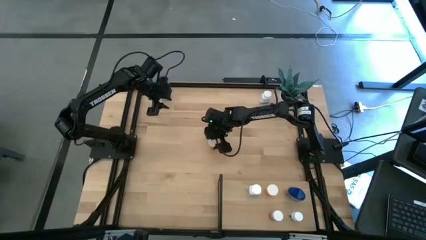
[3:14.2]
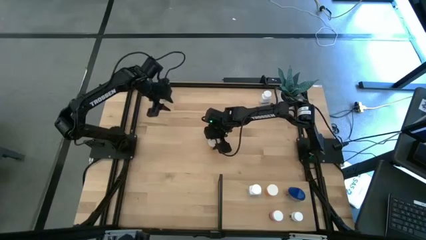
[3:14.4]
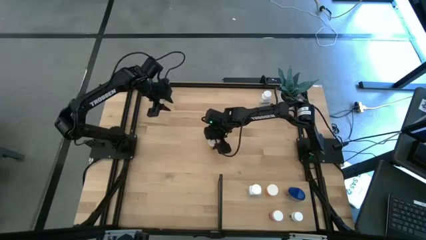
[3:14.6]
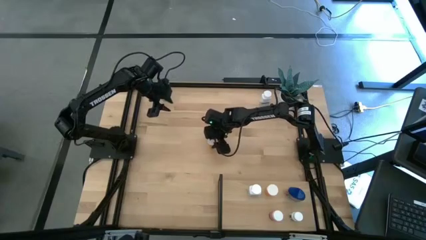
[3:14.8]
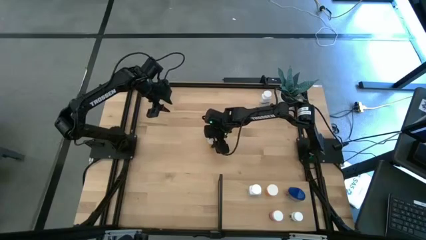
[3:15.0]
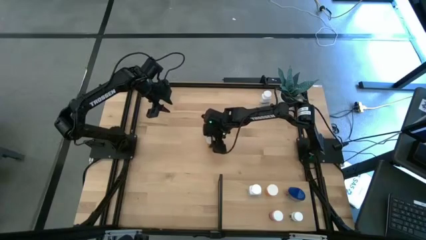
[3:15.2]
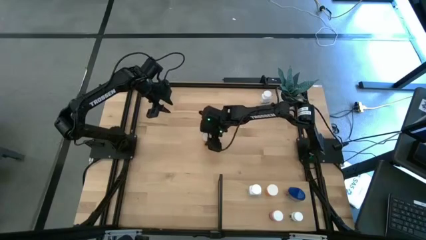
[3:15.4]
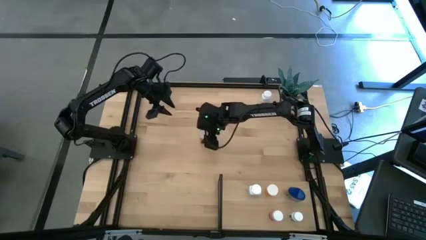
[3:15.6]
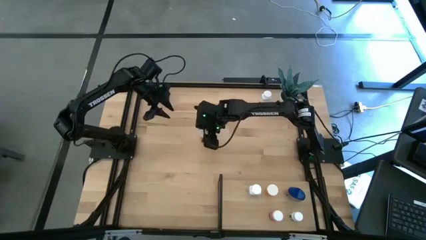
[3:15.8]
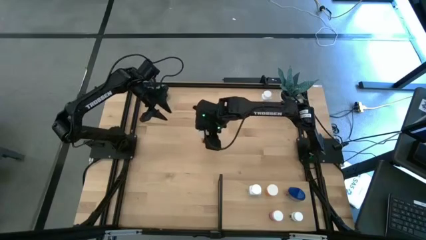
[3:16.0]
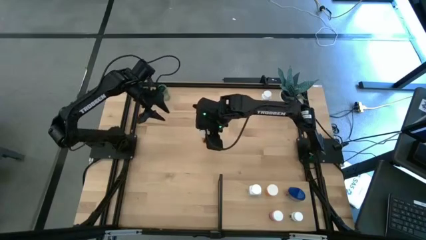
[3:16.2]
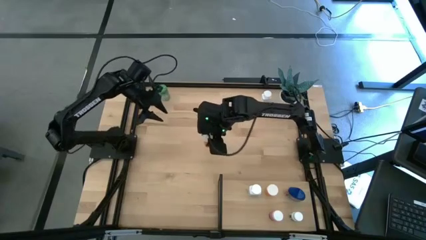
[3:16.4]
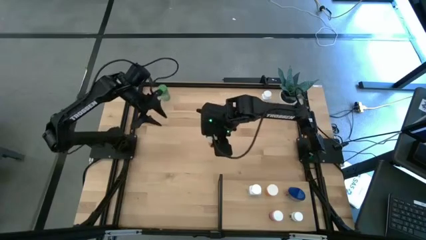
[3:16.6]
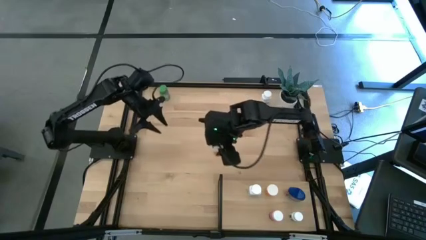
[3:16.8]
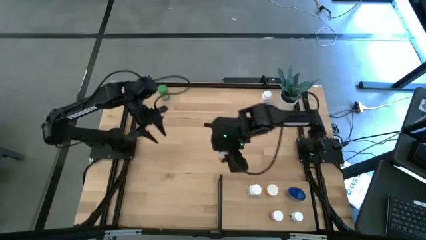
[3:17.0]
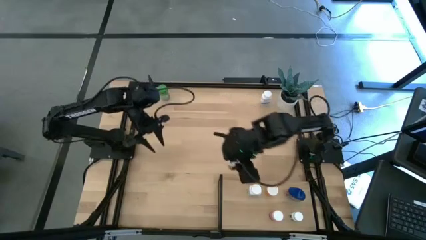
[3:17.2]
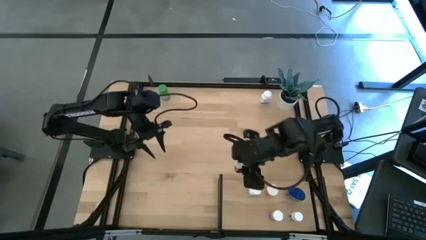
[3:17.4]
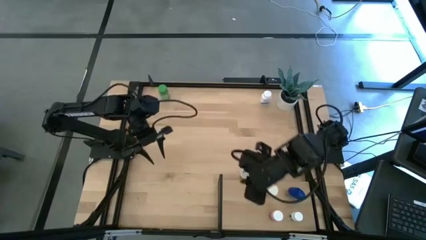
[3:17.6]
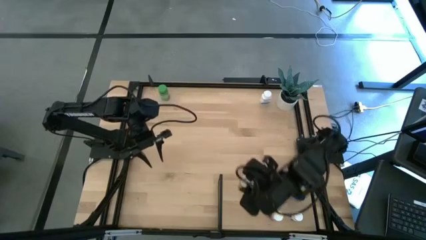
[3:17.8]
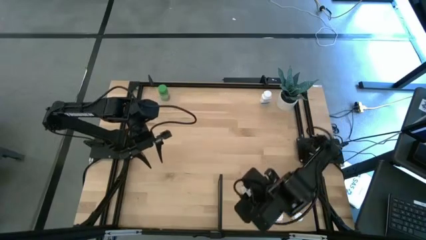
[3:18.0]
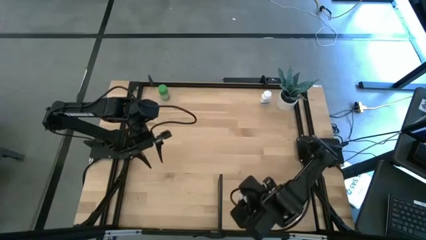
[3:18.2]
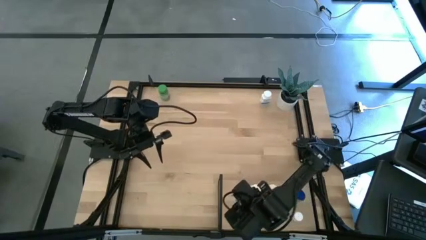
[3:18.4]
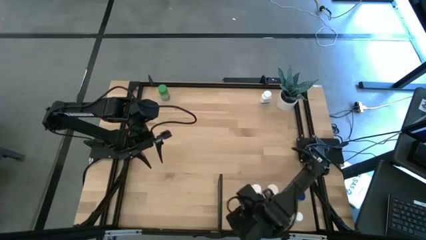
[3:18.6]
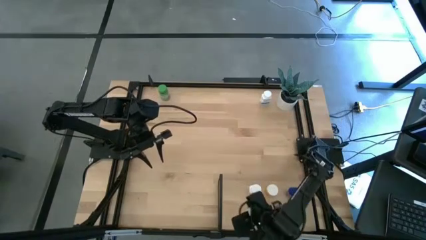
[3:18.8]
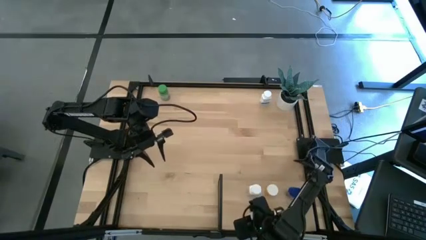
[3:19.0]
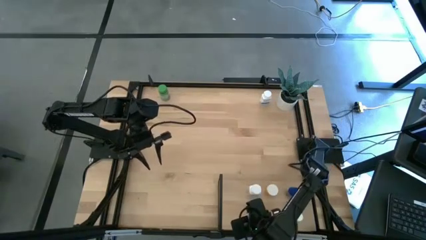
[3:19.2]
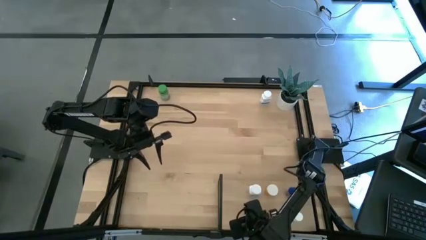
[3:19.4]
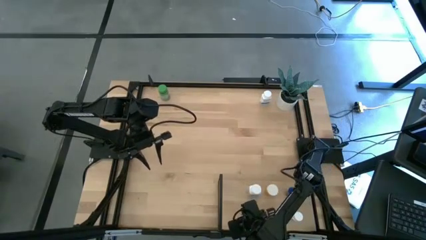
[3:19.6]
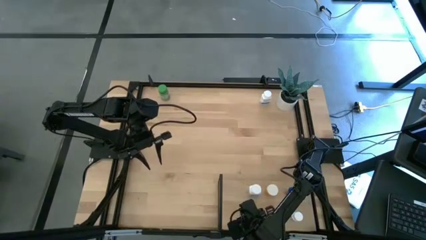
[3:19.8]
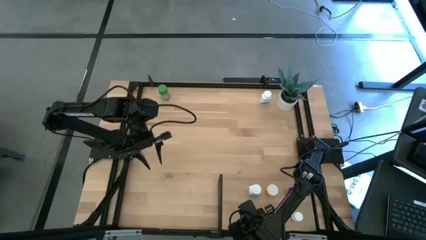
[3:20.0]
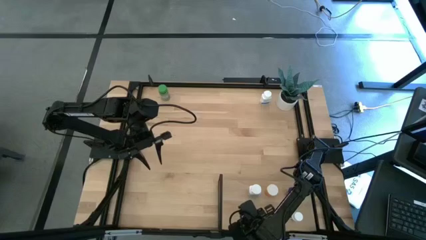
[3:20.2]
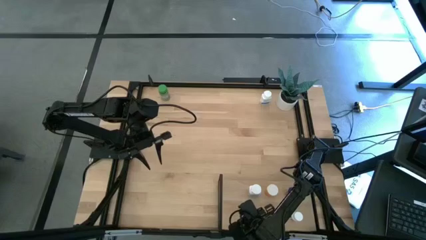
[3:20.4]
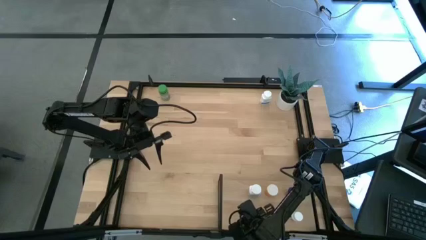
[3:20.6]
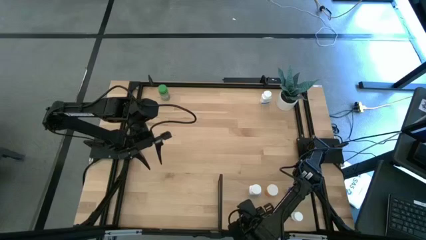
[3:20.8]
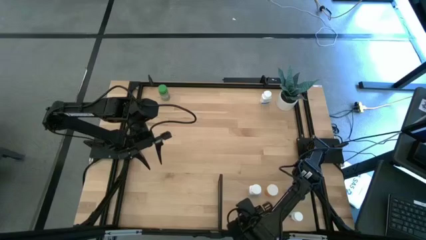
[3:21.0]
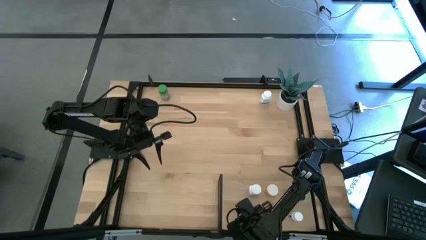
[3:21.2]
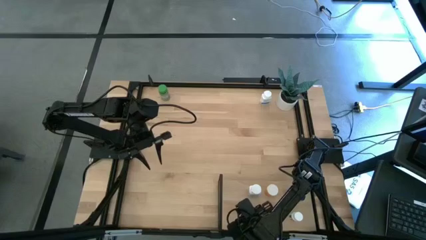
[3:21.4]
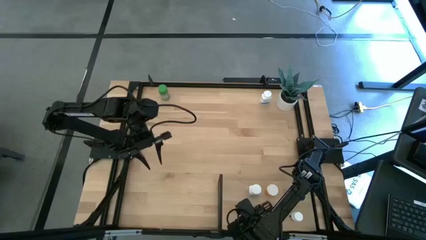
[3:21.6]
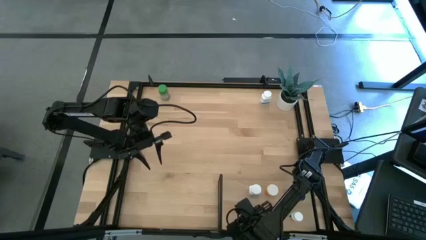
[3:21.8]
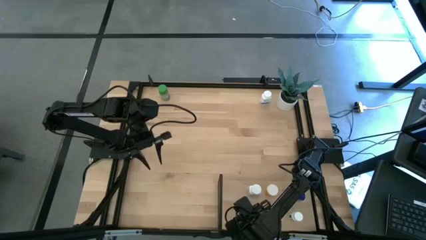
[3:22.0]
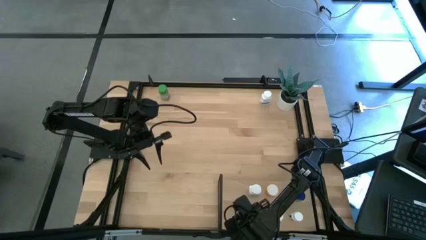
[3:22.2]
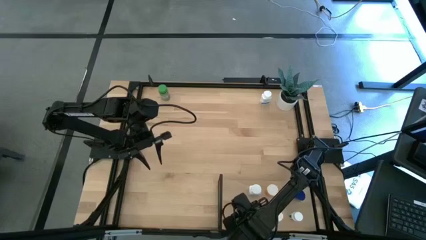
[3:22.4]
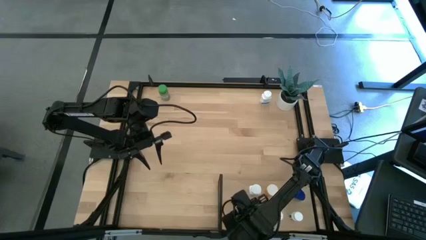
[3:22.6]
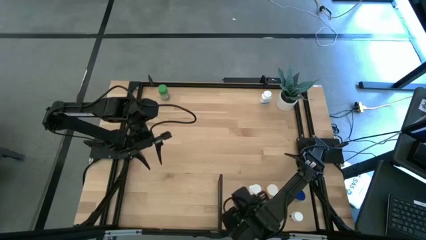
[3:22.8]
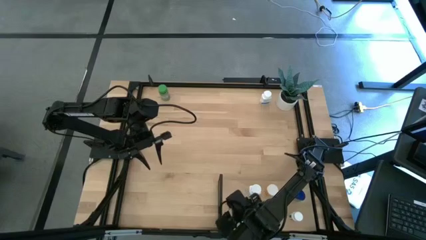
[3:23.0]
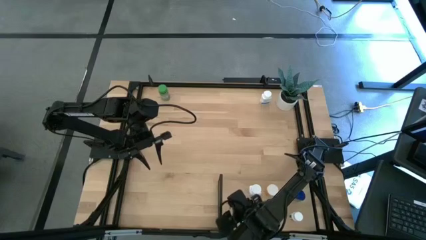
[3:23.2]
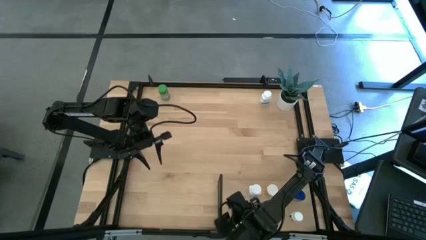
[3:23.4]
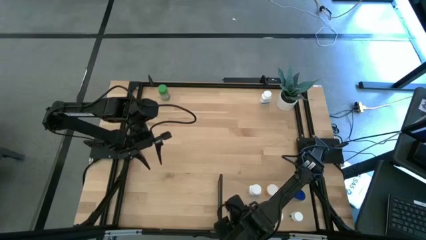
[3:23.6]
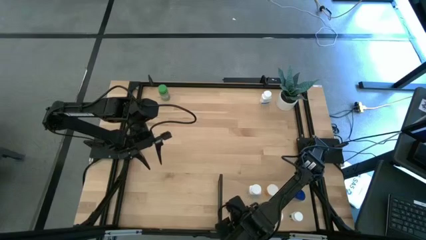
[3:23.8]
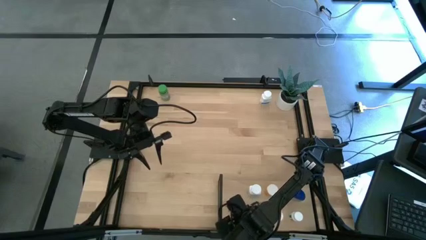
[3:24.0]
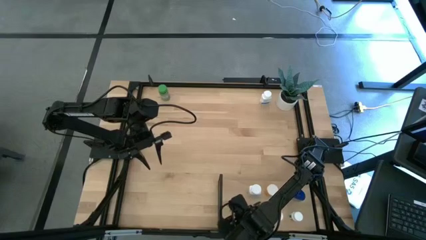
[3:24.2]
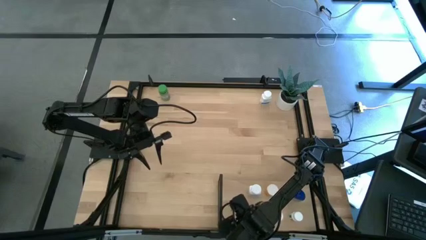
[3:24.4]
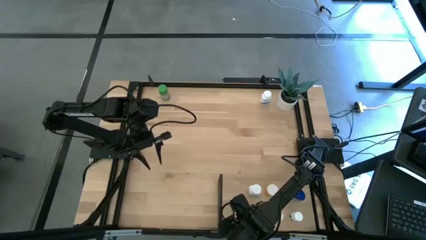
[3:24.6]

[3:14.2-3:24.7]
Task: Pick and place medicine bottles onto shelf by color
Put the orange pill bottle onto the shelf

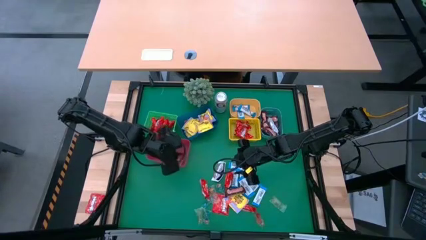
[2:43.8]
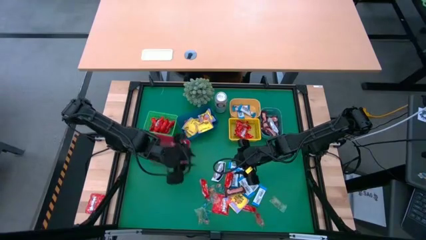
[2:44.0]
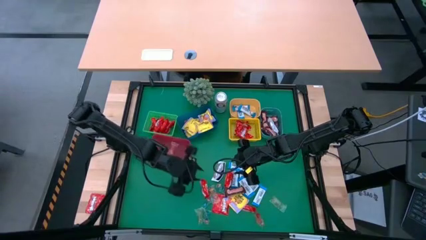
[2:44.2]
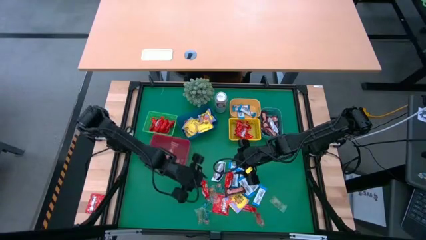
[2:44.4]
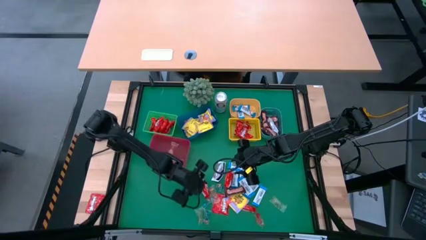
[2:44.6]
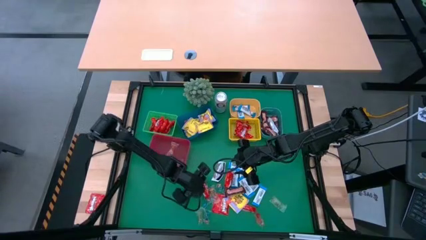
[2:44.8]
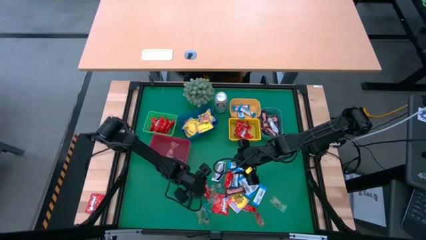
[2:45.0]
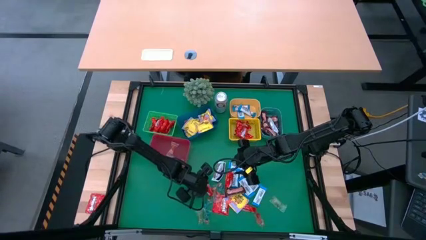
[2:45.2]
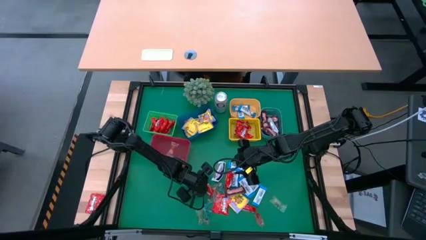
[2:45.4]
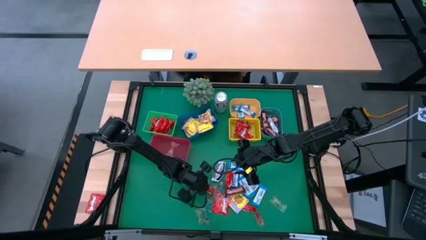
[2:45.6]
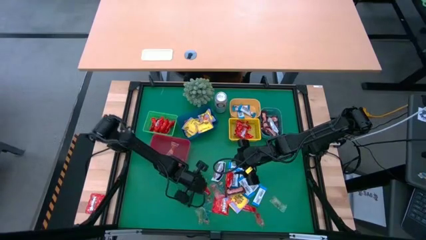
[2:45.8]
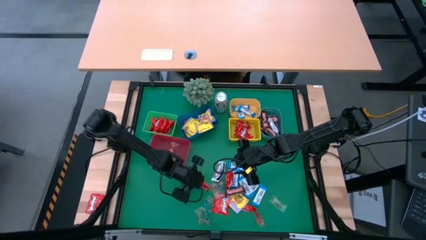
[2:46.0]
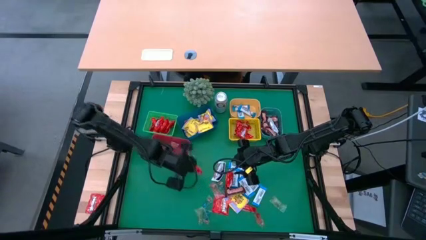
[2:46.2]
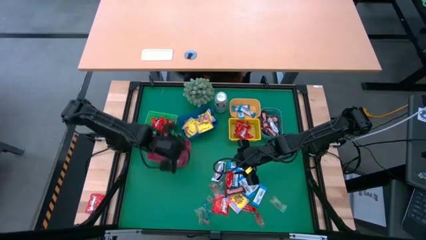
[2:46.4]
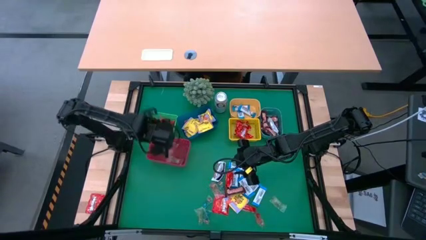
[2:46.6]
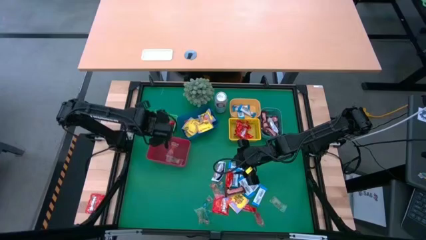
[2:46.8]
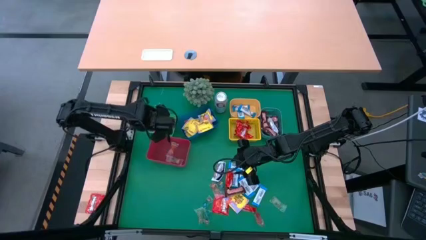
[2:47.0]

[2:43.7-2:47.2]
Task: Sort candy
Put the red chocolate bar into the green bin

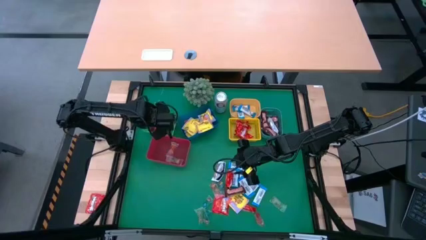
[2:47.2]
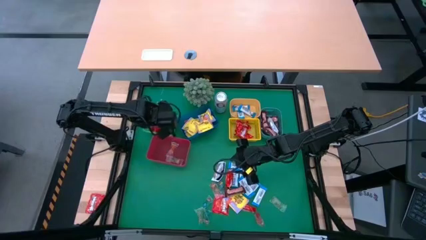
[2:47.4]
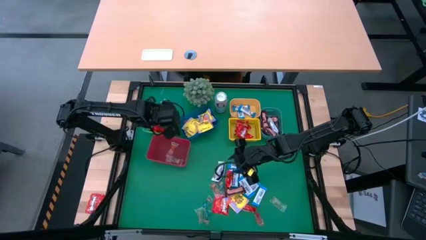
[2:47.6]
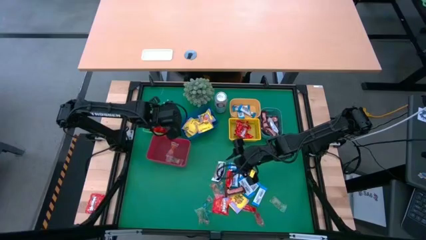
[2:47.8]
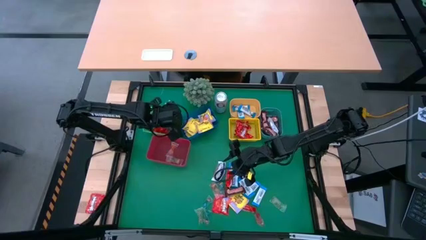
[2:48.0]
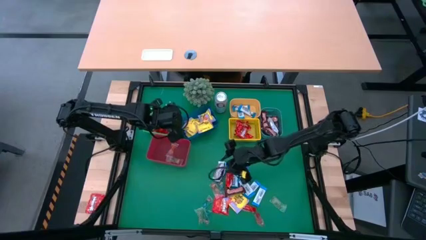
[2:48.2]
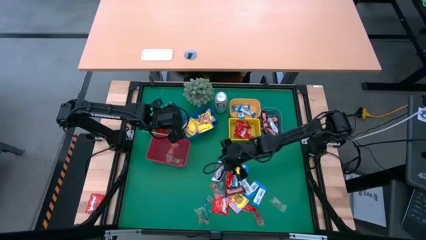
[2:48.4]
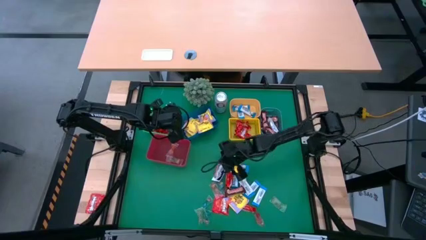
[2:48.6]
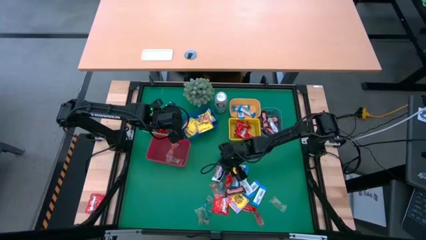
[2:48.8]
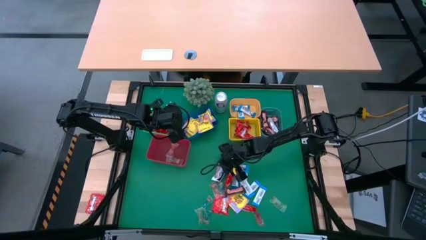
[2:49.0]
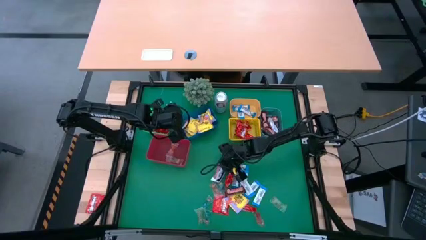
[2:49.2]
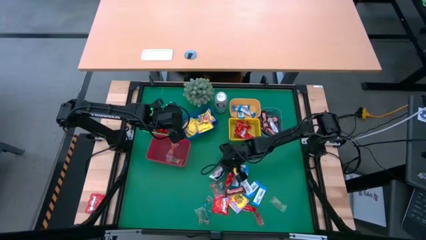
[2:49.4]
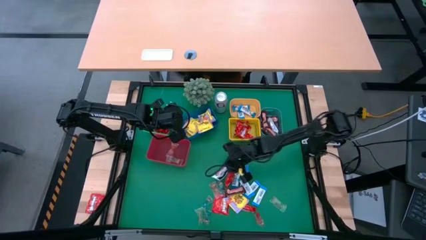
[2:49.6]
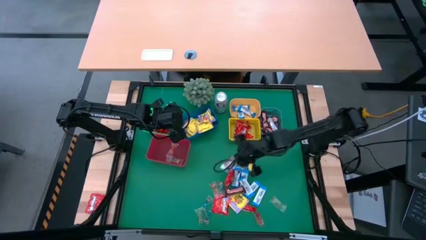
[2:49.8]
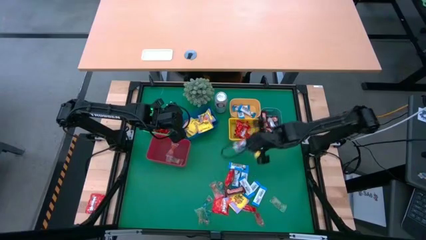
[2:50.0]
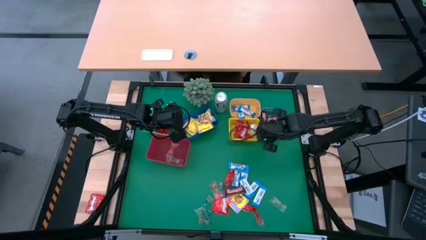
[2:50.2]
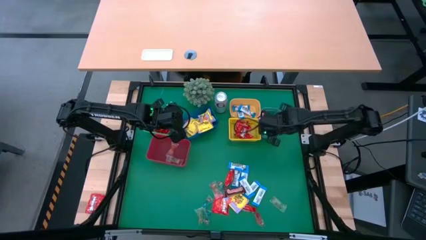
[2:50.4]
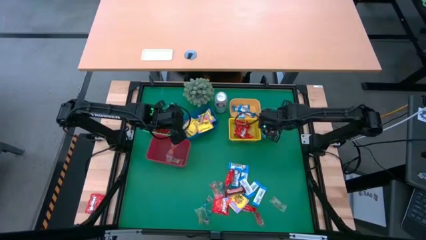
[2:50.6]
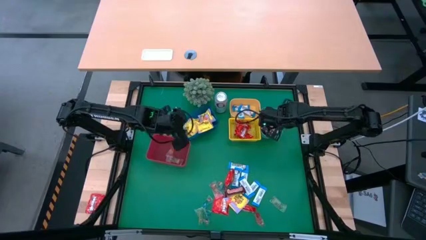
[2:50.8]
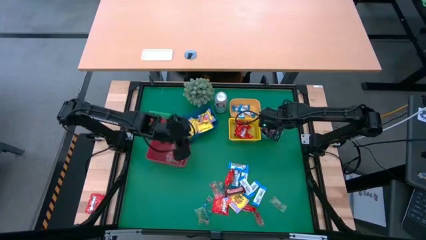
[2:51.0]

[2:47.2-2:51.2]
Put the white chocolate bar into the green bin
